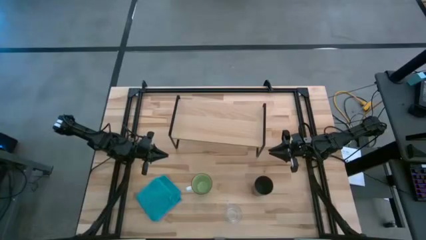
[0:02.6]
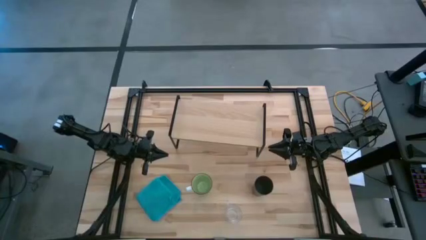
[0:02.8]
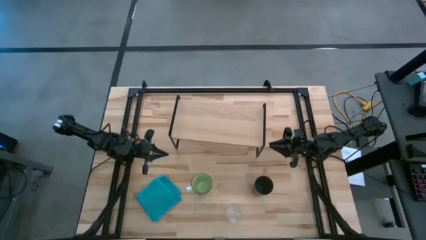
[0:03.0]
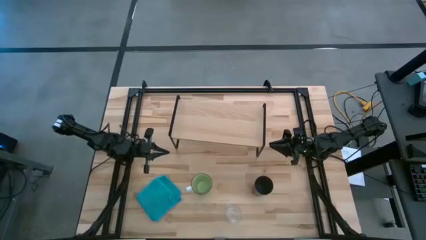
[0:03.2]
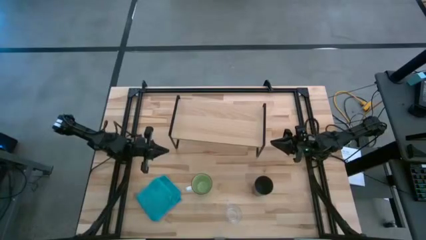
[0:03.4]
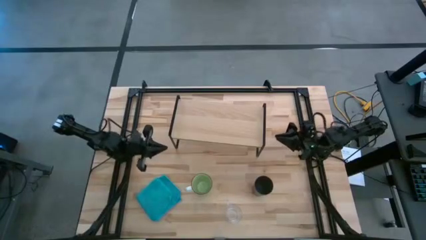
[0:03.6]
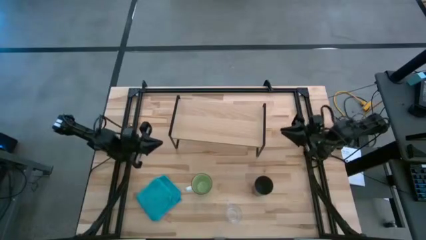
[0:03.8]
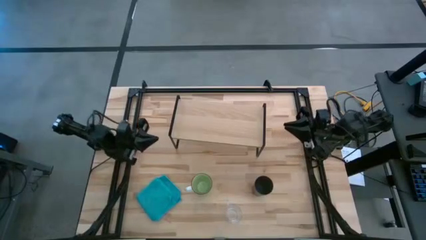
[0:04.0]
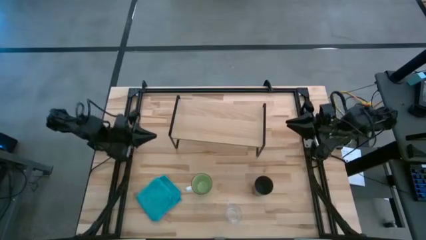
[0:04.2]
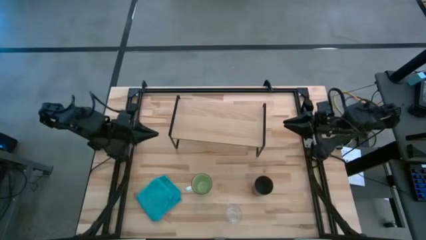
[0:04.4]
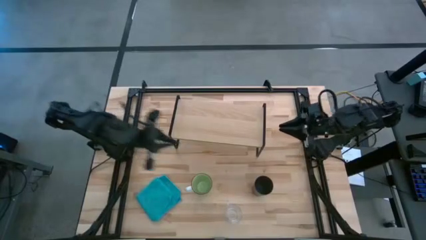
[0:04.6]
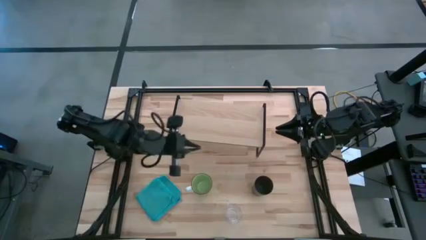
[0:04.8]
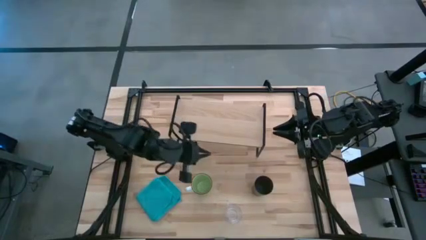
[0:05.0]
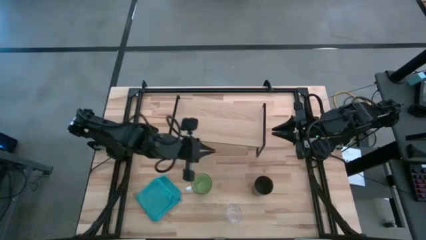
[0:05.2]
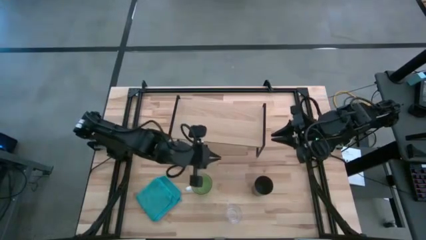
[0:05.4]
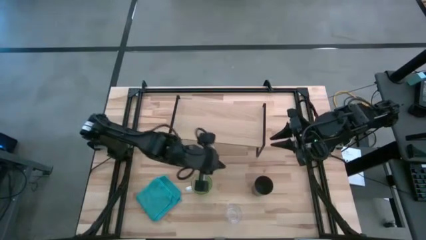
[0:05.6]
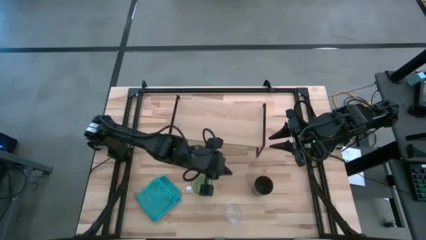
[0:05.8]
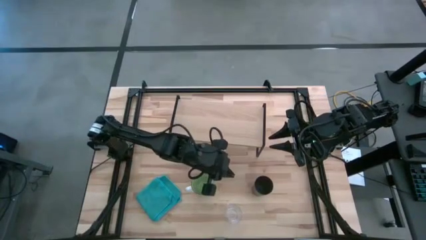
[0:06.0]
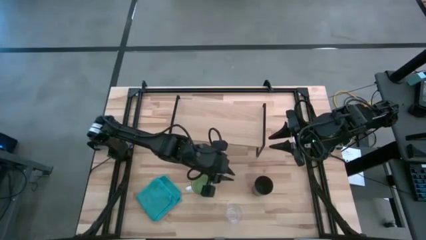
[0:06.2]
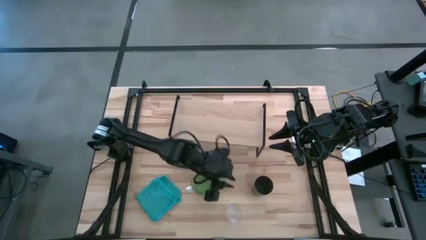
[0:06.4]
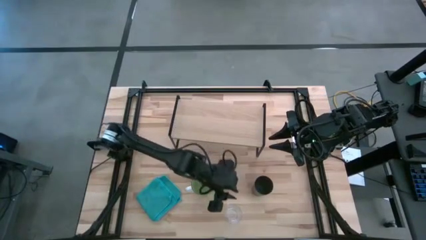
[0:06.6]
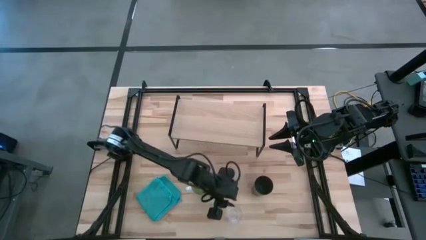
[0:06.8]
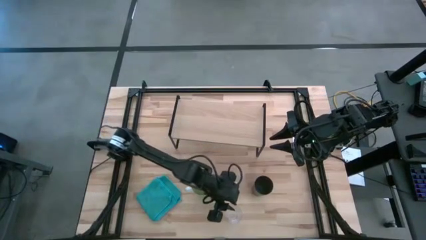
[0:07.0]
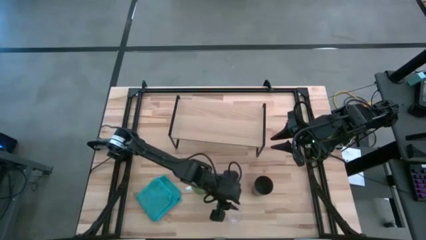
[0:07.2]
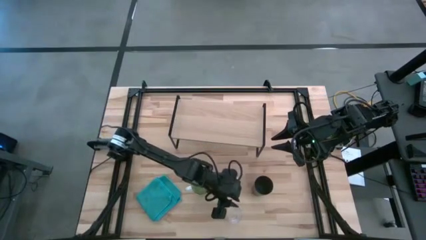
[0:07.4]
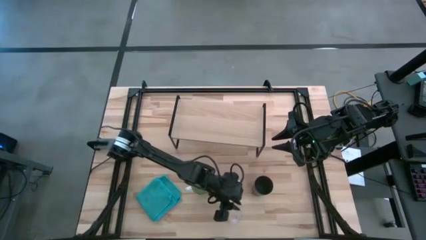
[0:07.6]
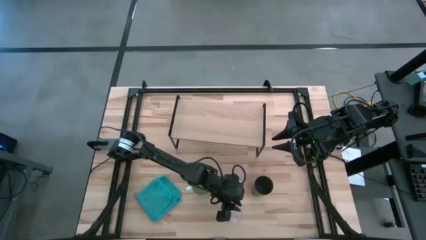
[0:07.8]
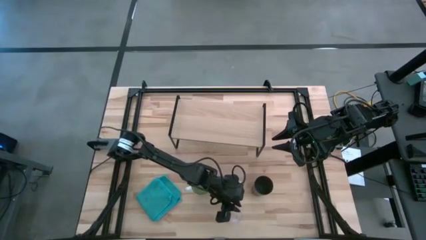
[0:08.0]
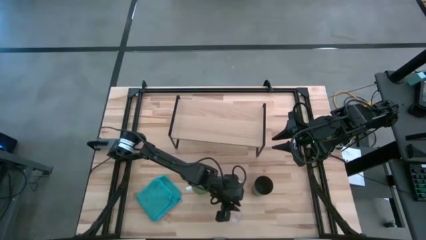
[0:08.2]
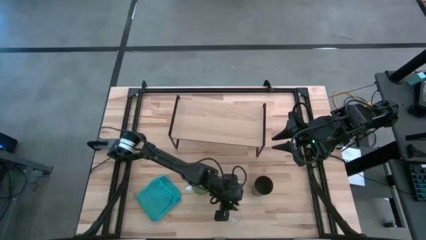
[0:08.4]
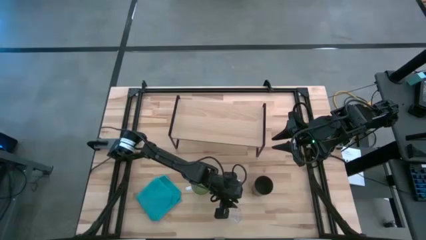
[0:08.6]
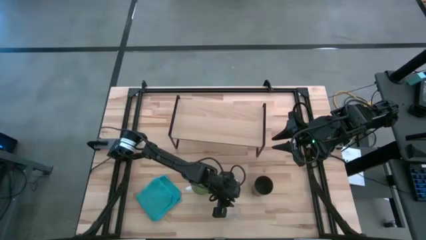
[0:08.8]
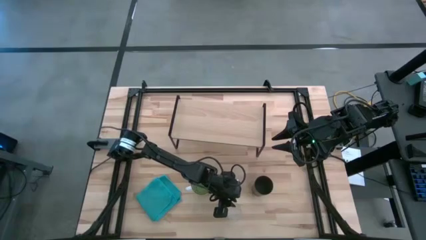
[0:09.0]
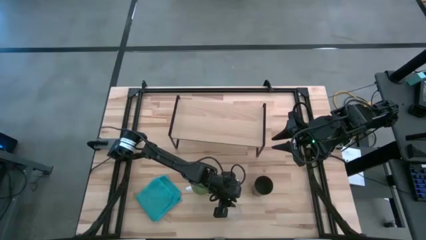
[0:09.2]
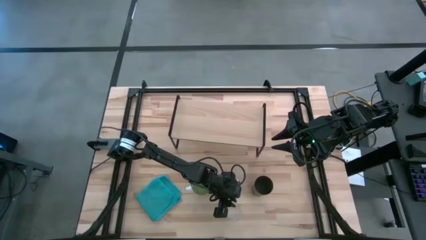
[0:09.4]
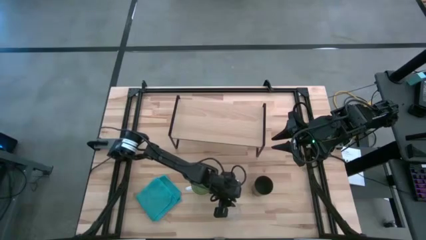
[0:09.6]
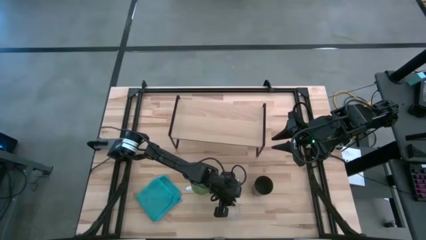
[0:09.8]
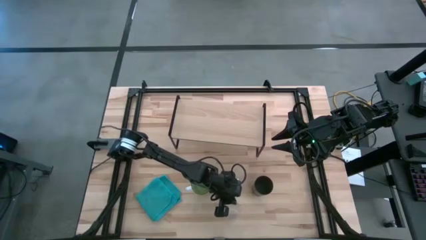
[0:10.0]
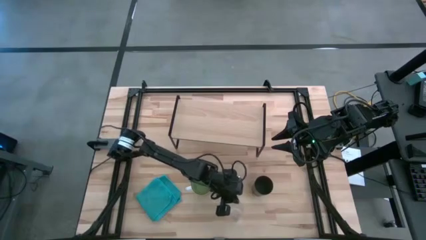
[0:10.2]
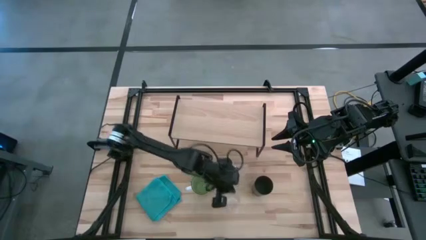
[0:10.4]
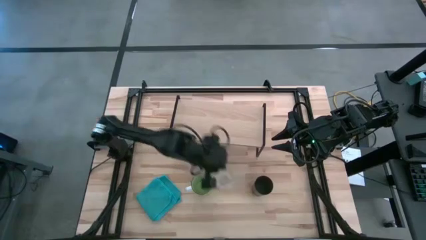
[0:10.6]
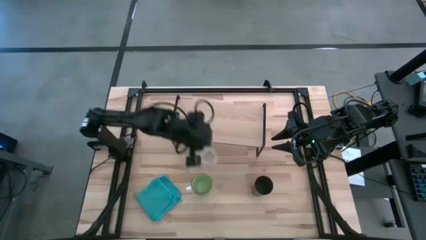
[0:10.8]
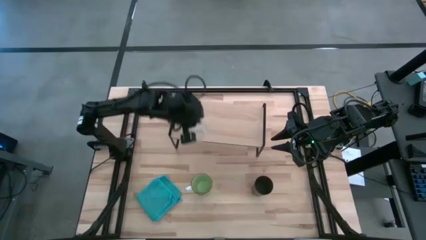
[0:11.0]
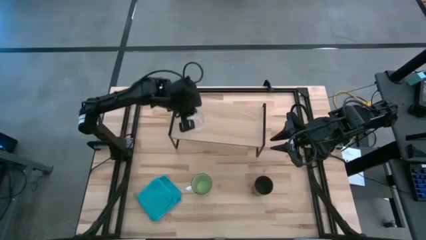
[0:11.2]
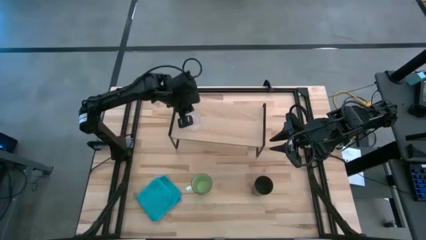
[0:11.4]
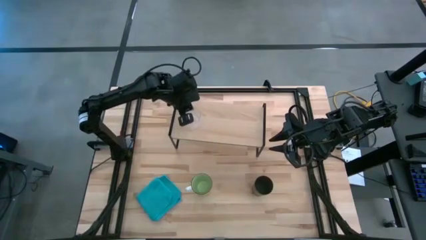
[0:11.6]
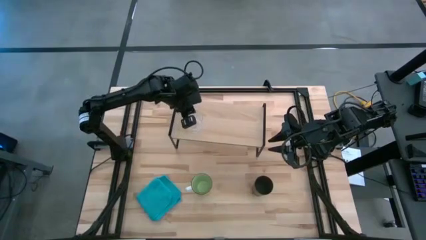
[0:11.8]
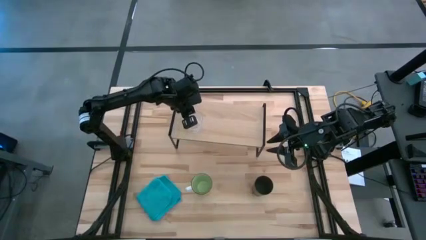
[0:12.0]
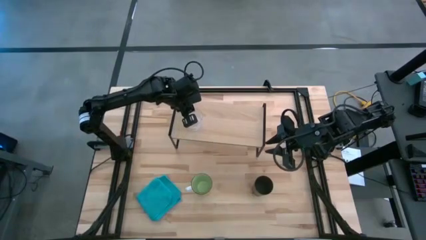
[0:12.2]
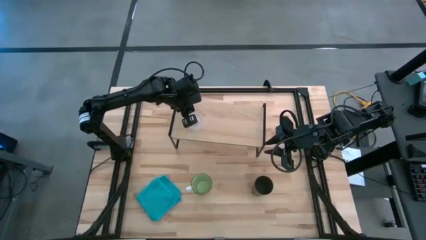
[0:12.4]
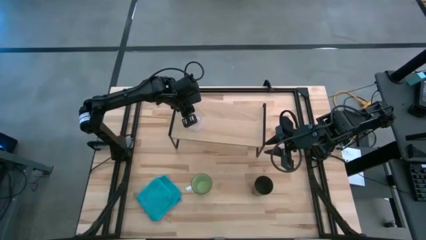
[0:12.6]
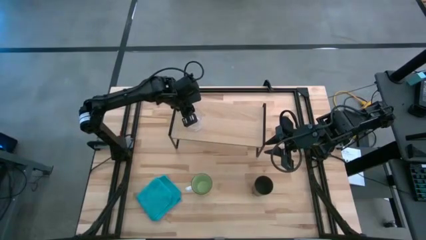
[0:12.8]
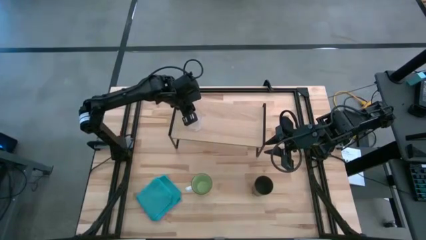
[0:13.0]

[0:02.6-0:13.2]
Task: Stack small to large cups/mugs on shelf
Put the transparent mug on the shelf

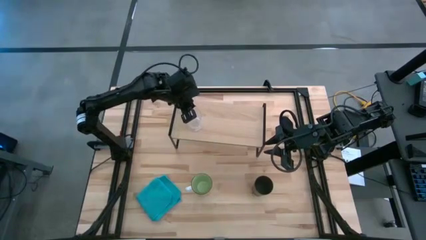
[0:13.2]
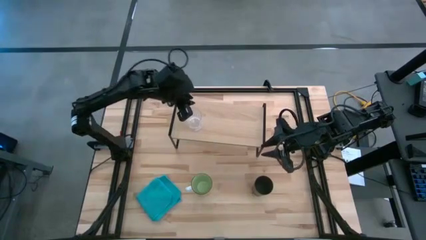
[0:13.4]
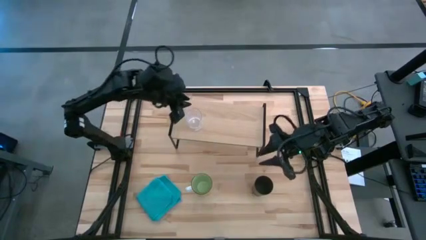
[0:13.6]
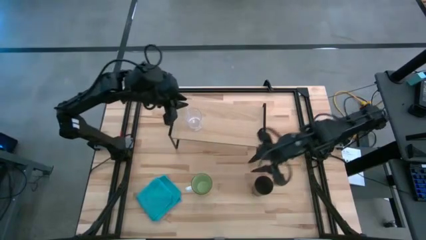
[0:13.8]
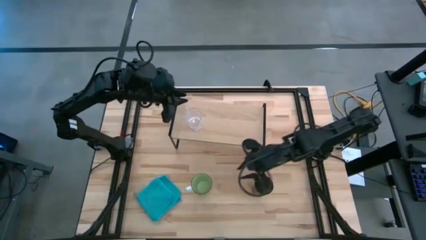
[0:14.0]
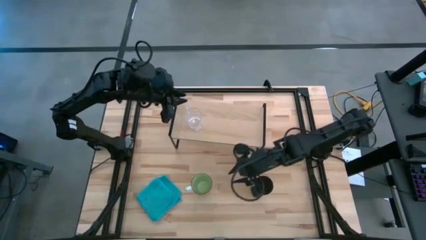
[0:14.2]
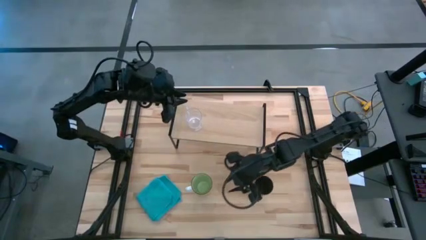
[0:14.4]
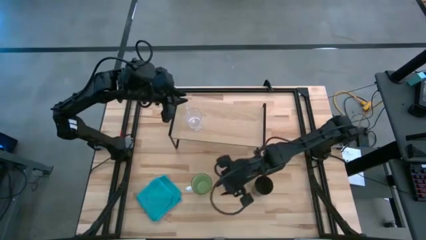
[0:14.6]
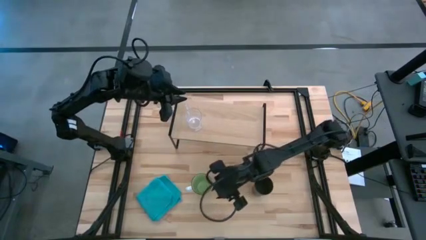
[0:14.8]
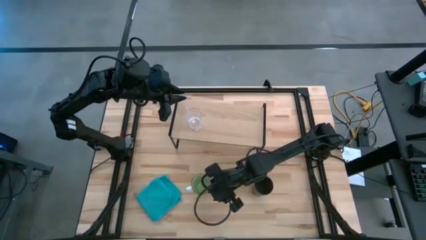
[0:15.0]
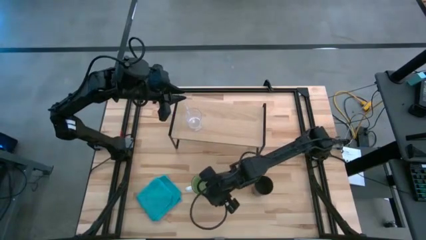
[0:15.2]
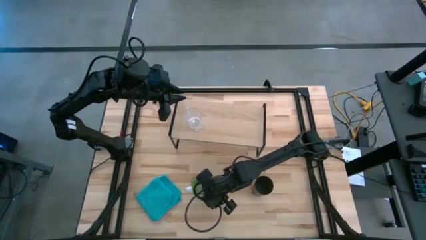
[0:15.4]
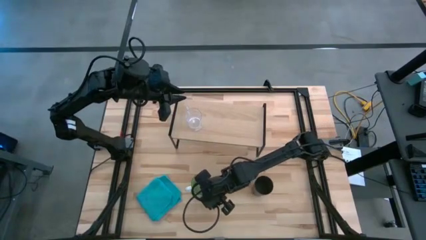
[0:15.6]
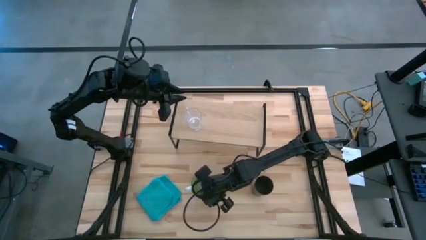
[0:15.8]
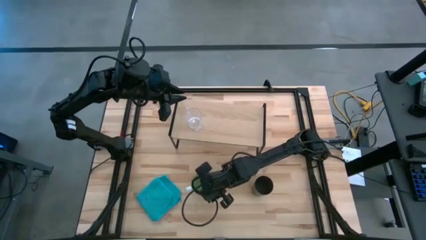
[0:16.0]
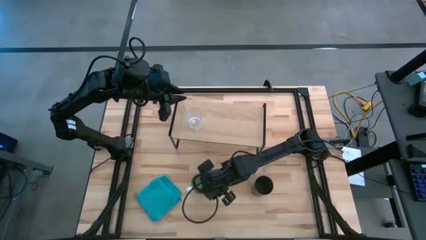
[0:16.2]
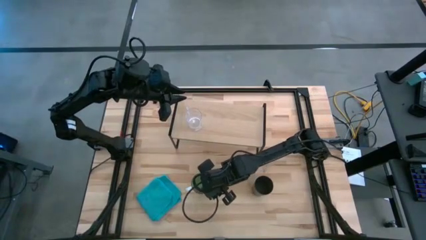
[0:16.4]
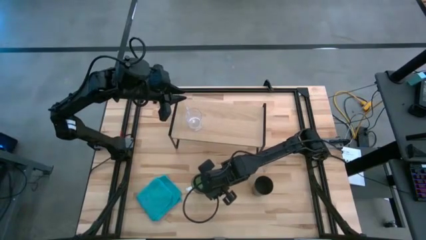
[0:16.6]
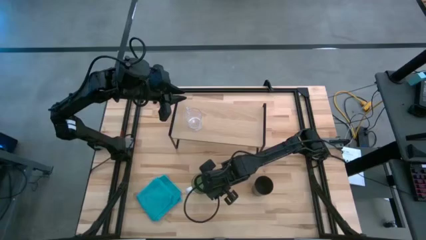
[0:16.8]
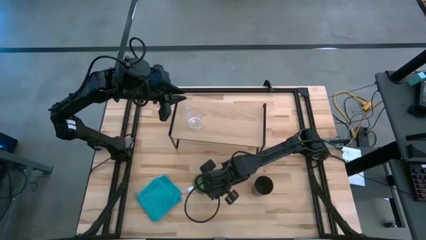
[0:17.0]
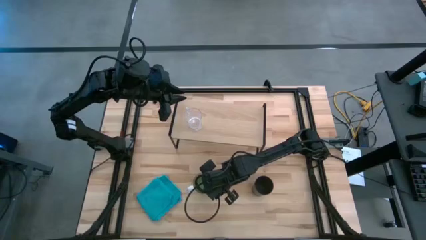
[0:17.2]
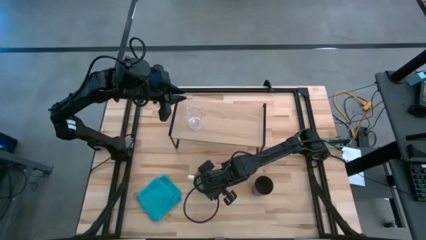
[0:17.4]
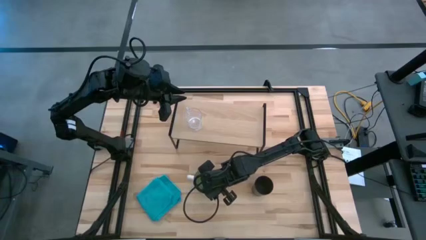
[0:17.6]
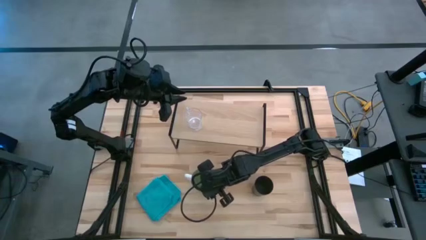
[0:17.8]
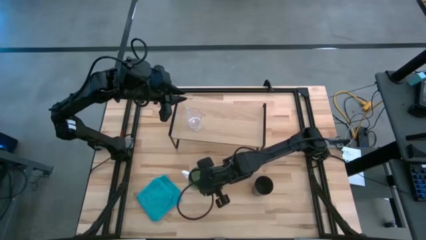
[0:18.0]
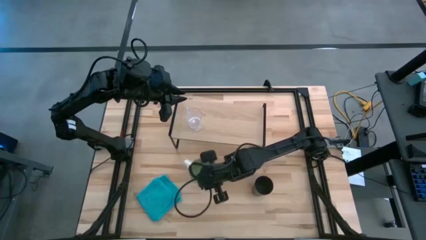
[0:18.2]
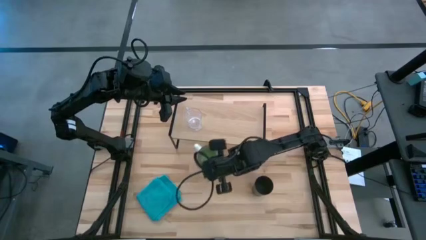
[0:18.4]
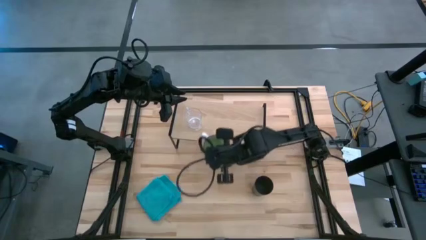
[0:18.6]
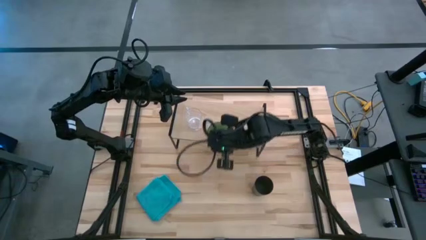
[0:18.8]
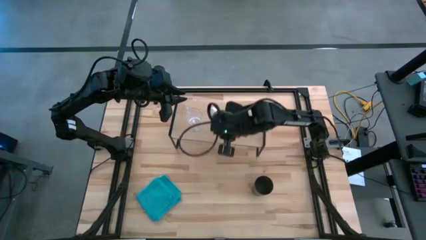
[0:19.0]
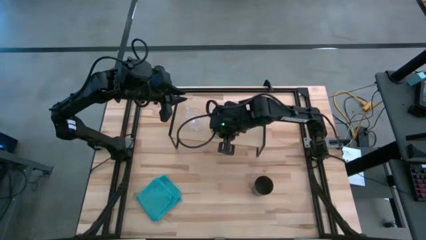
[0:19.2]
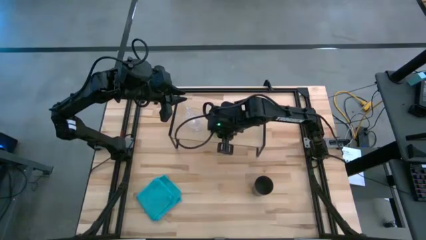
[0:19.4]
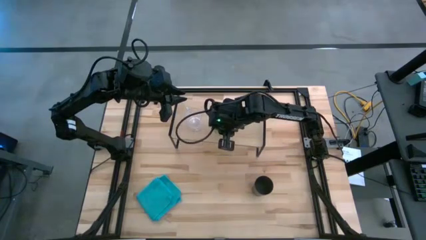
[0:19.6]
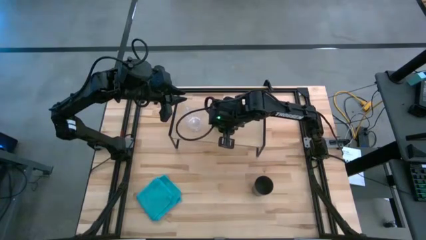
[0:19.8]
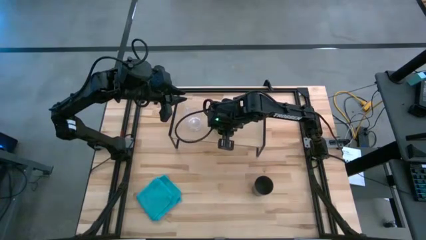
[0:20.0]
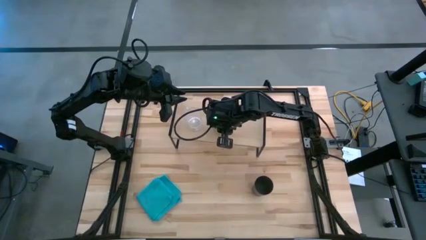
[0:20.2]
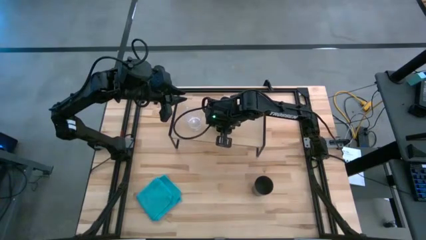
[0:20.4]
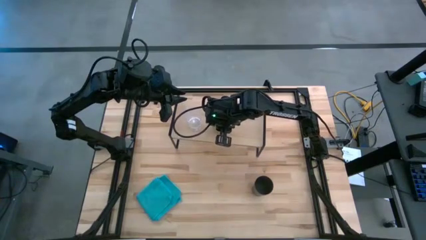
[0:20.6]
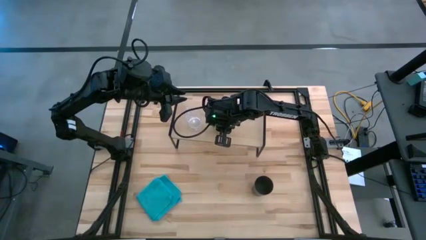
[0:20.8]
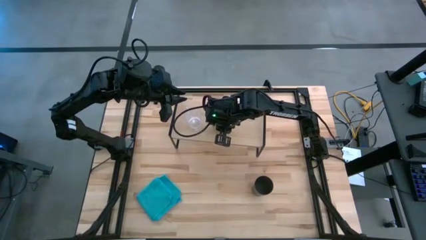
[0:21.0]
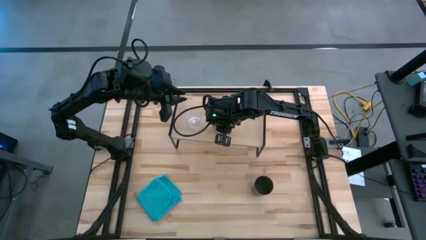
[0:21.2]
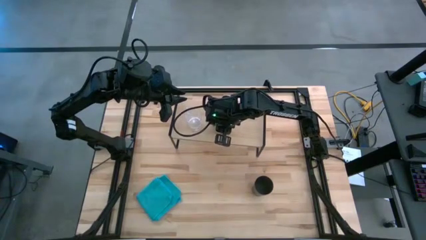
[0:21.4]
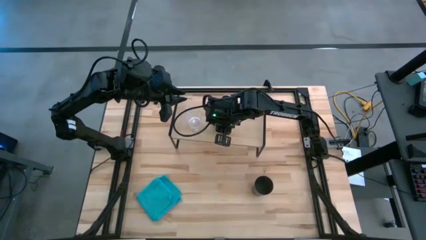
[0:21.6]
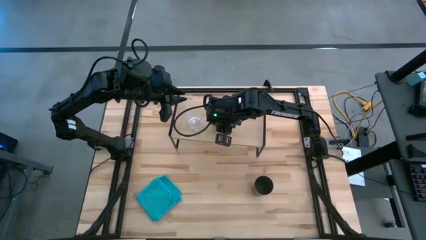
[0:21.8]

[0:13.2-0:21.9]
Put the green mug on the shelf
